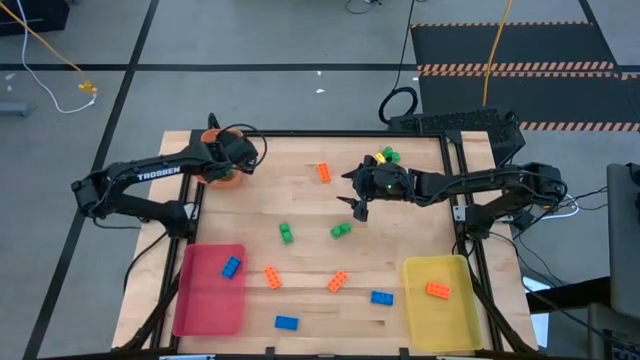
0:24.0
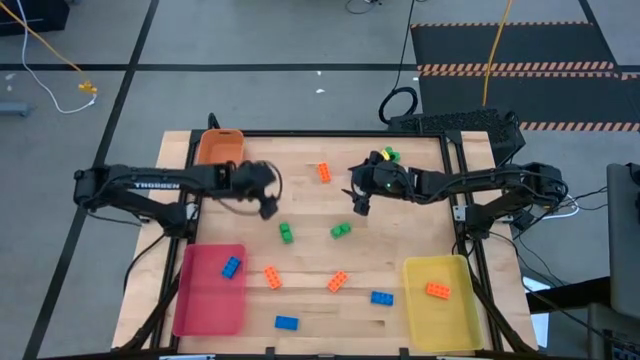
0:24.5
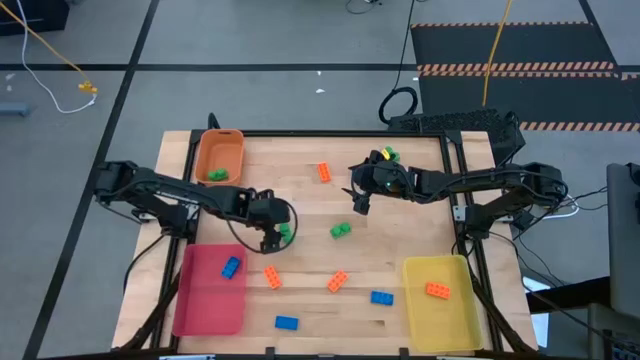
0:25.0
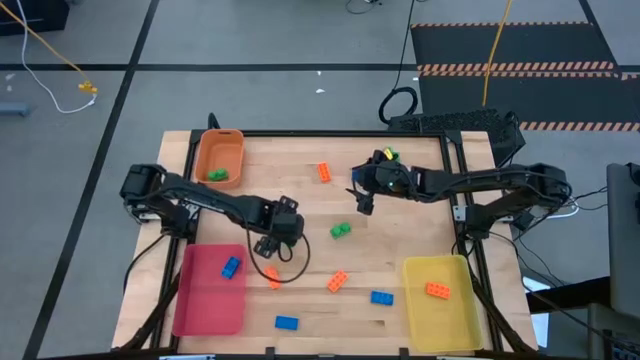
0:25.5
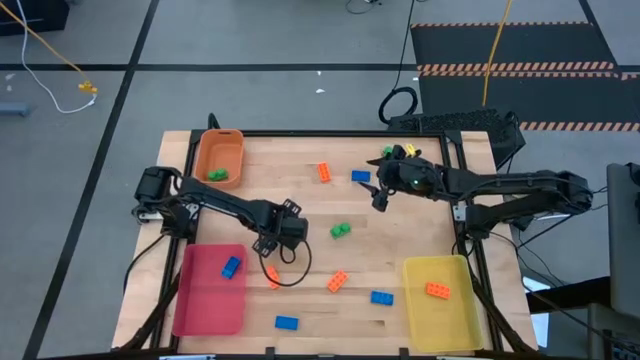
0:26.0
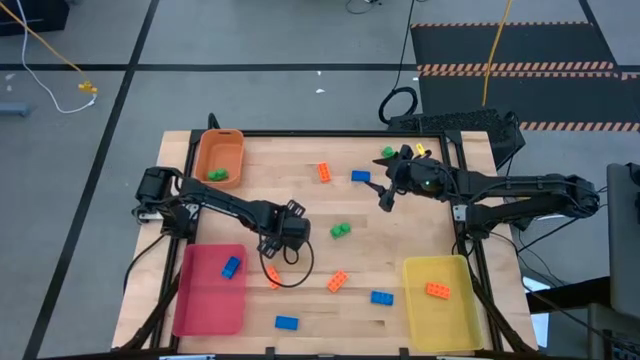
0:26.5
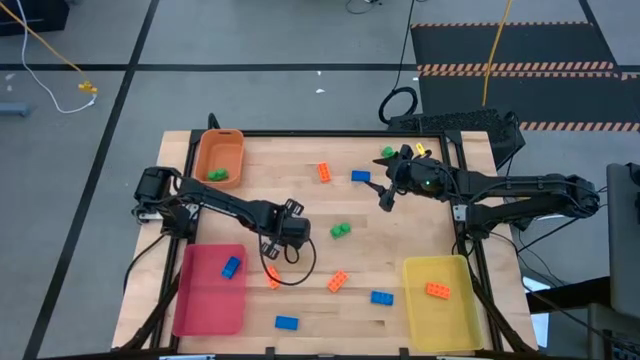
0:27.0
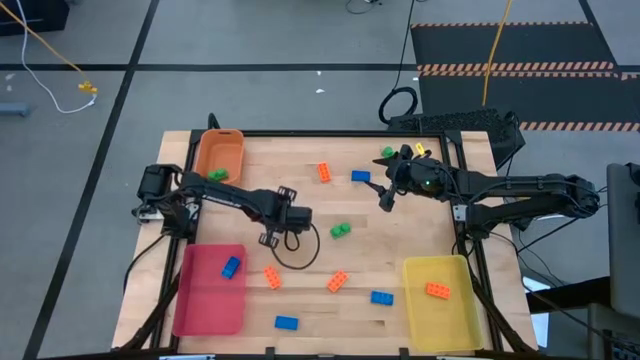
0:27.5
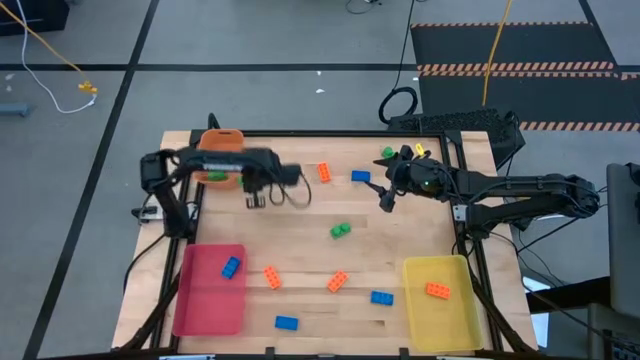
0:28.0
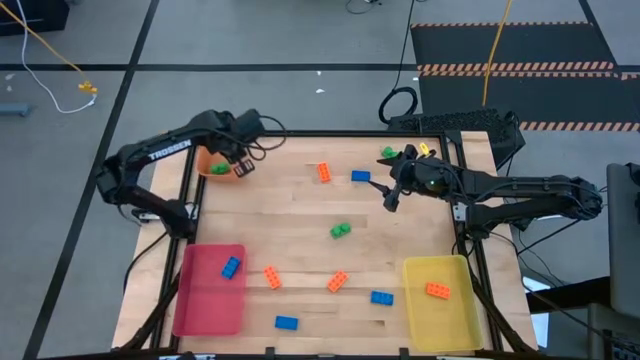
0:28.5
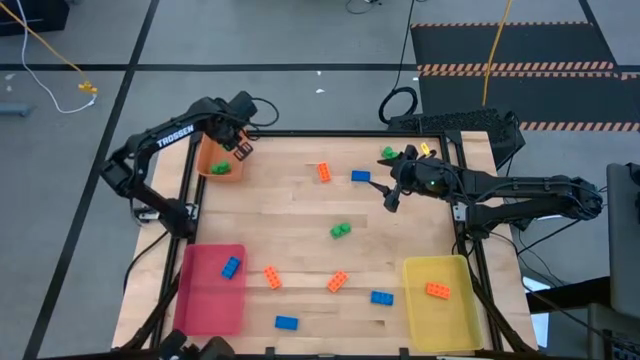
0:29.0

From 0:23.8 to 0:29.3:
Task: Sort & place blocks by color
Put the green game piece into the orange bin

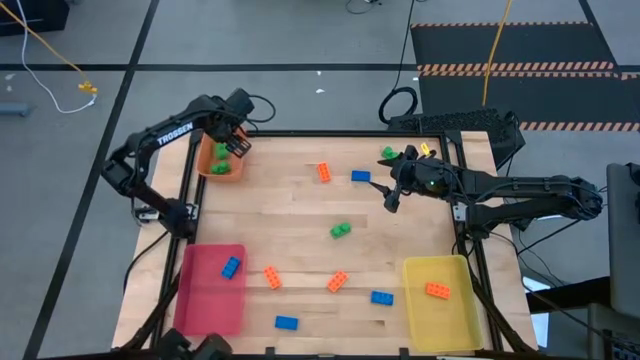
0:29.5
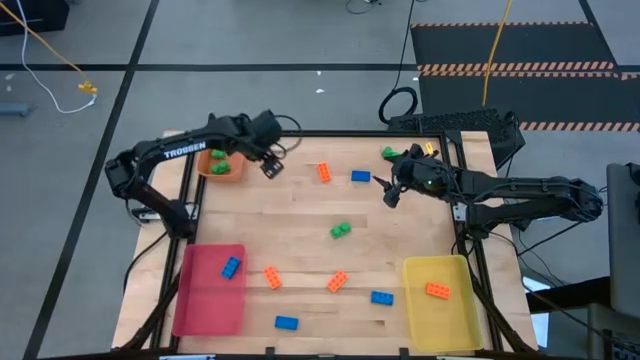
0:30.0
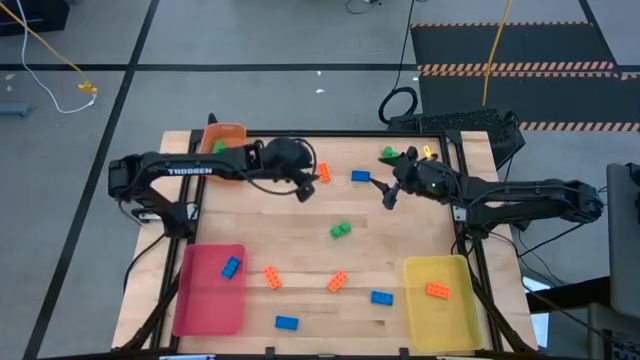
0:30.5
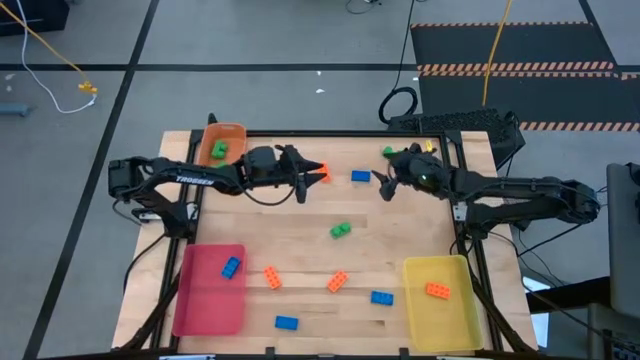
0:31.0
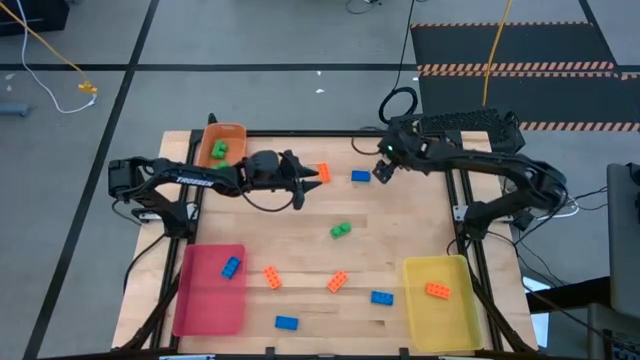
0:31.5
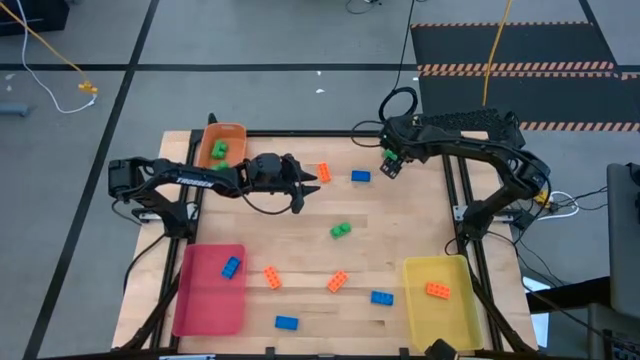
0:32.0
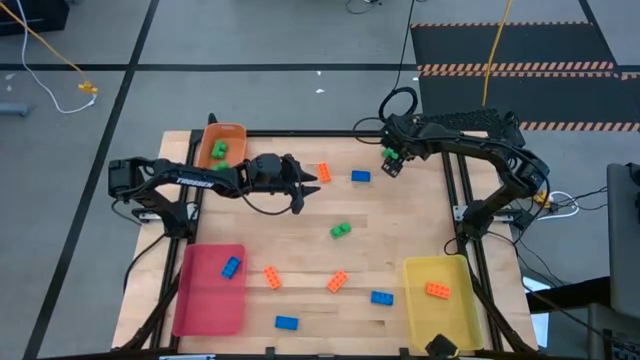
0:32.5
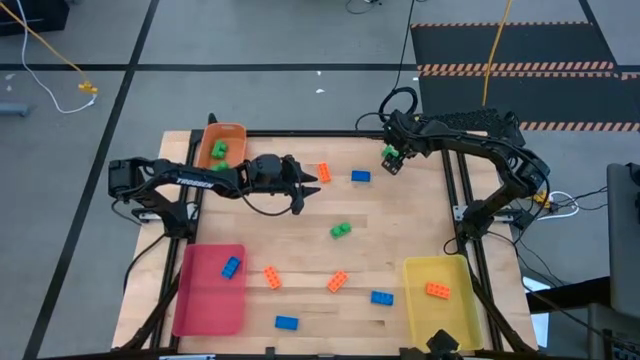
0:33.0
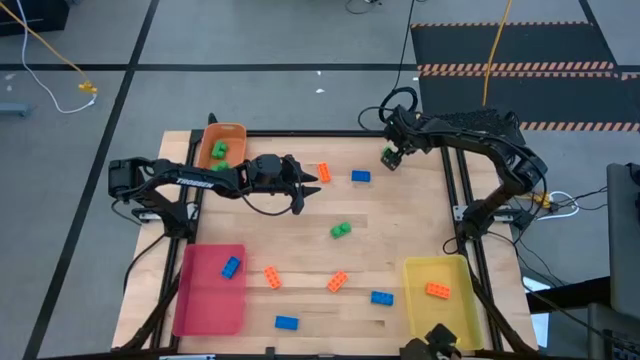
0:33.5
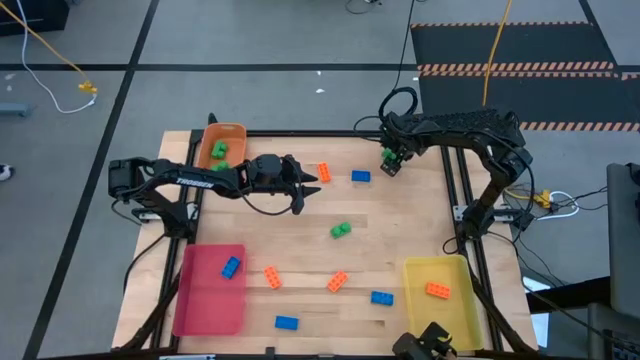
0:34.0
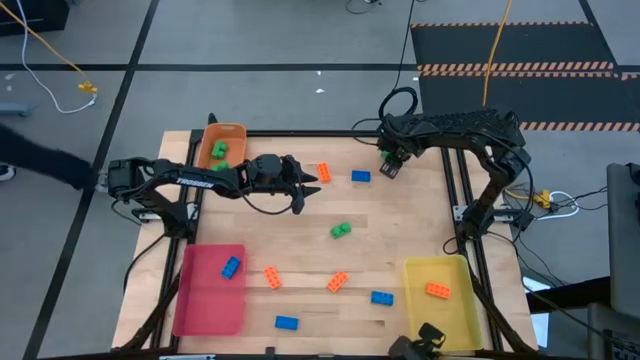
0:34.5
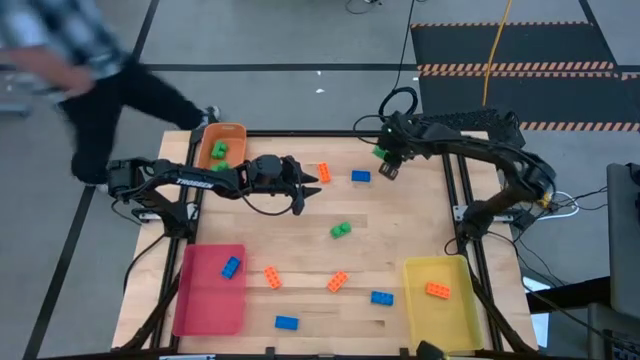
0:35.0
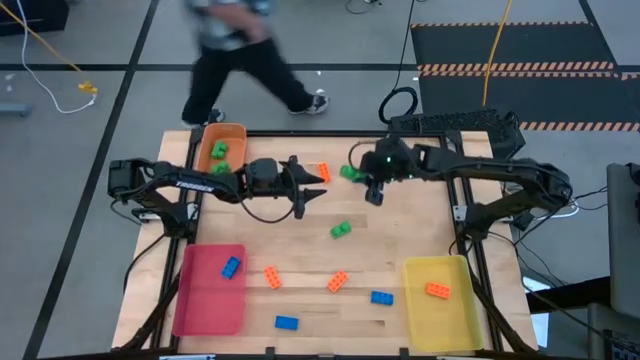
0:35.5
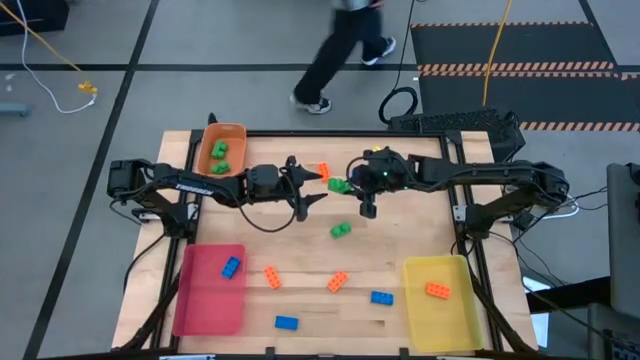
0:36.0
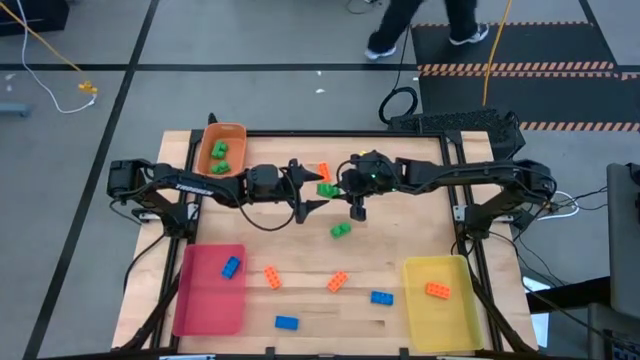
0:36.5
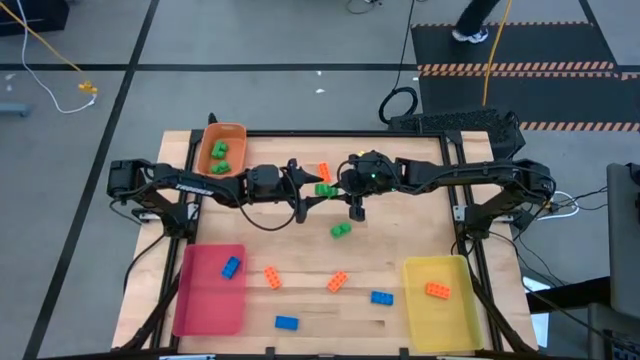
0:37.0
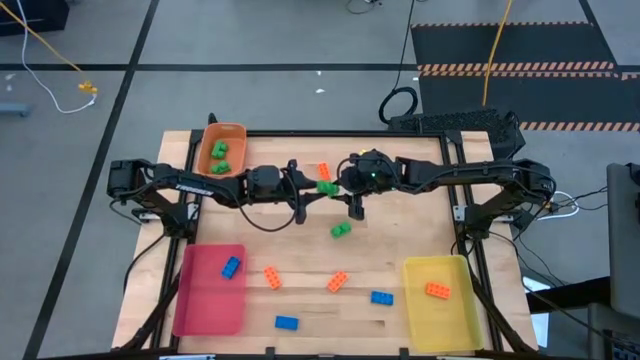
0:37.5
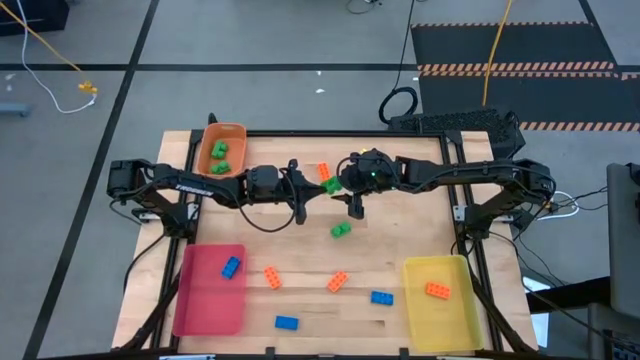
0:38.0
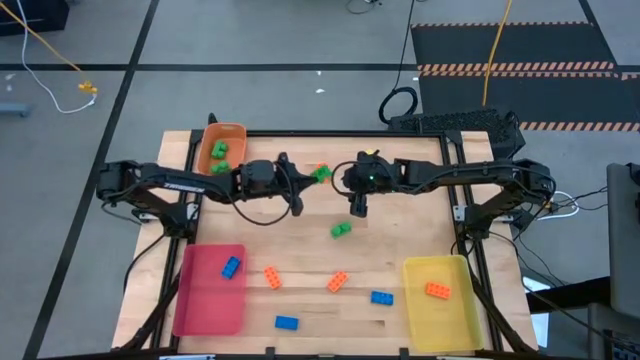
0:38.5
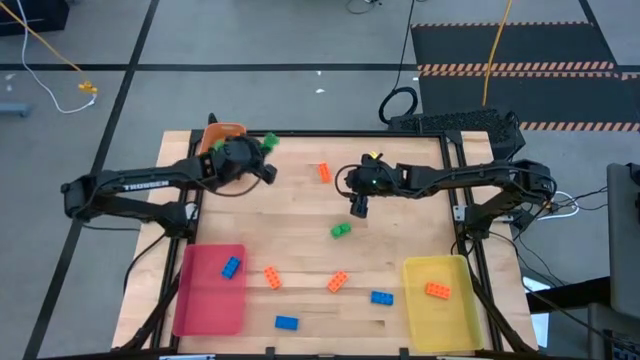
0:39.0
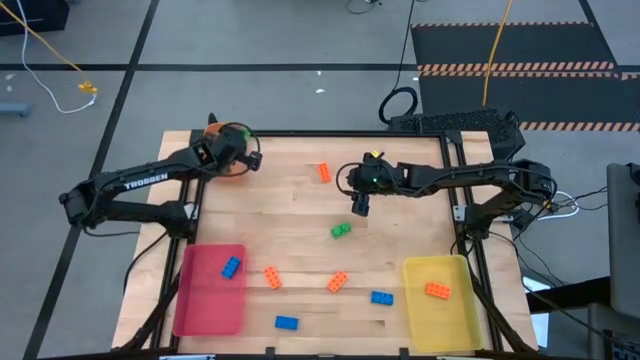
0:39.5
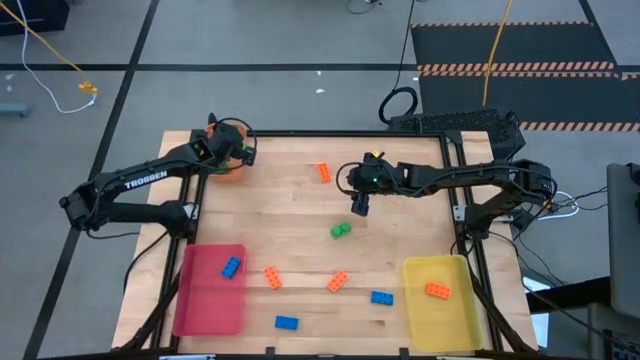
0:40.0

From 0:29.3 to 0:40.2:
Put the game piece into the orange bin

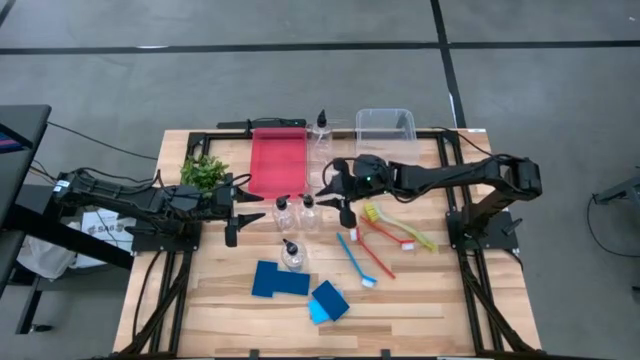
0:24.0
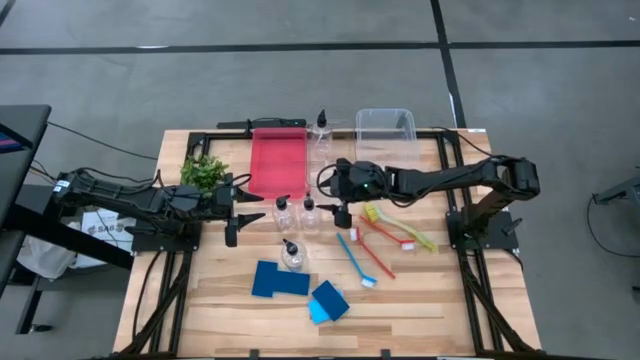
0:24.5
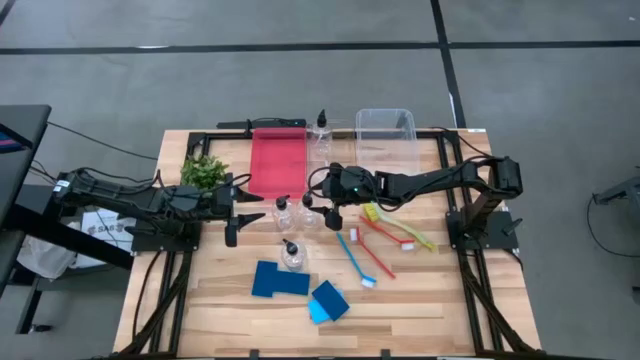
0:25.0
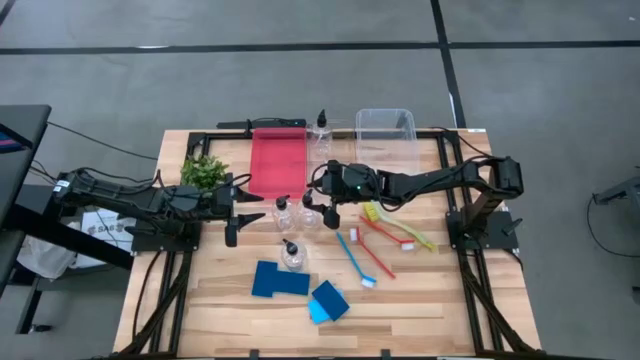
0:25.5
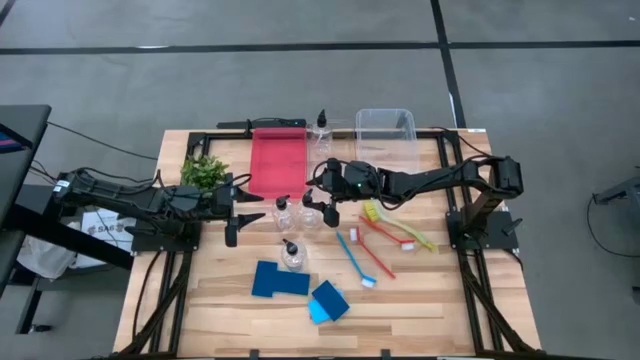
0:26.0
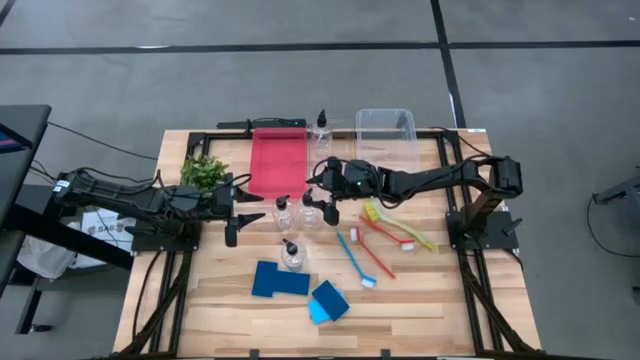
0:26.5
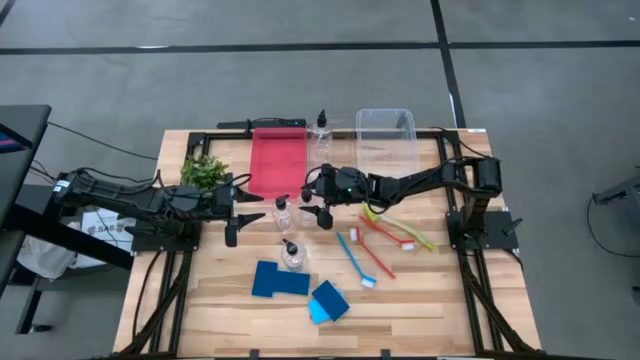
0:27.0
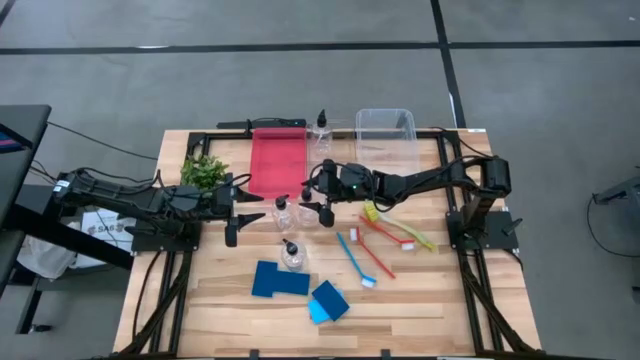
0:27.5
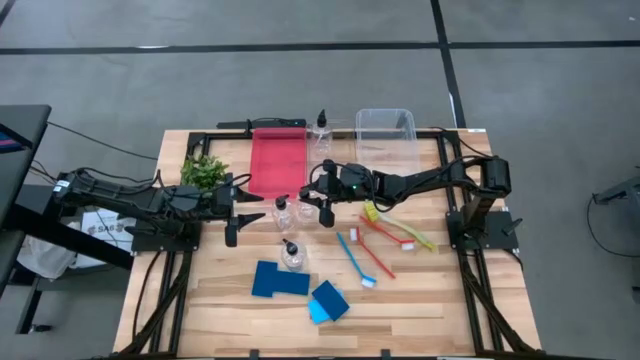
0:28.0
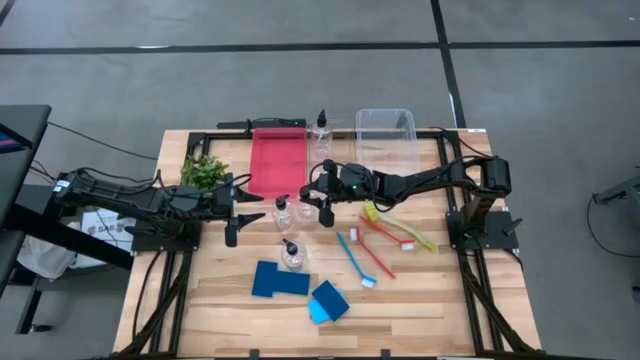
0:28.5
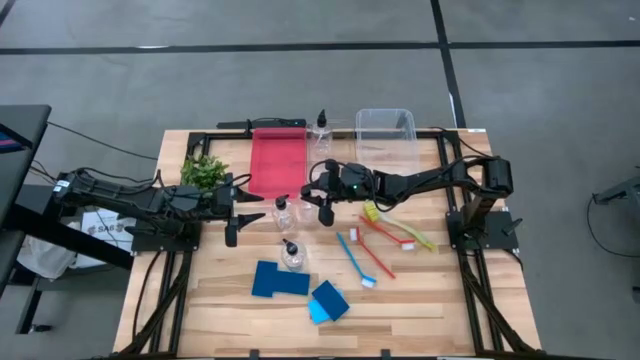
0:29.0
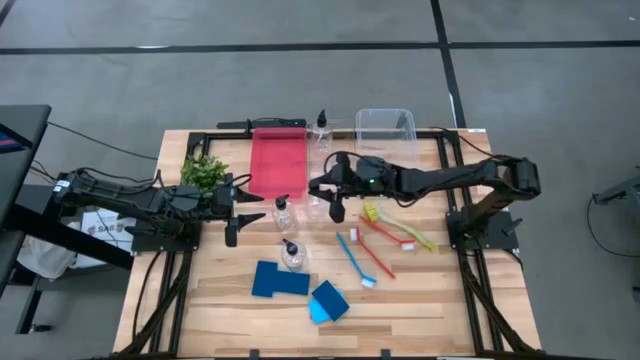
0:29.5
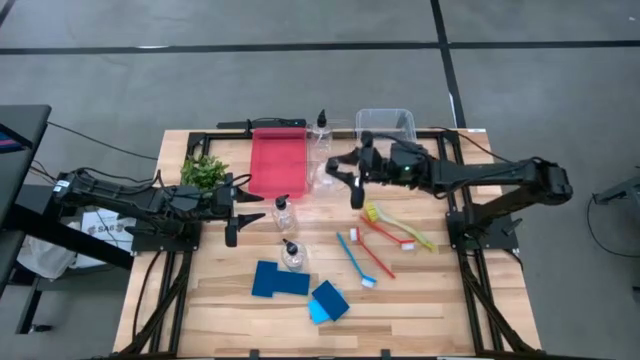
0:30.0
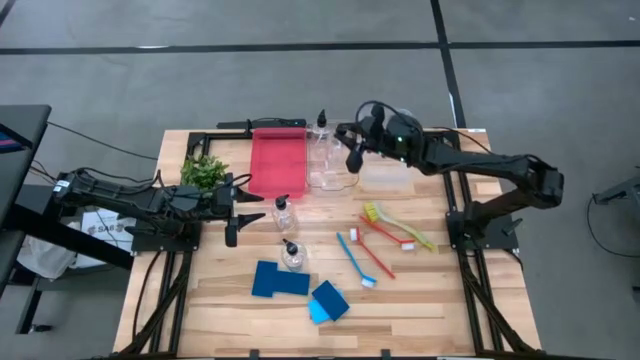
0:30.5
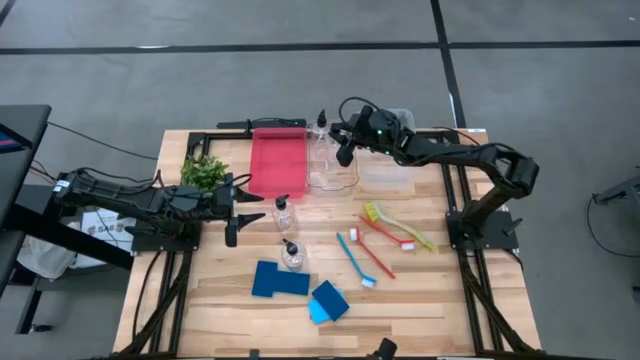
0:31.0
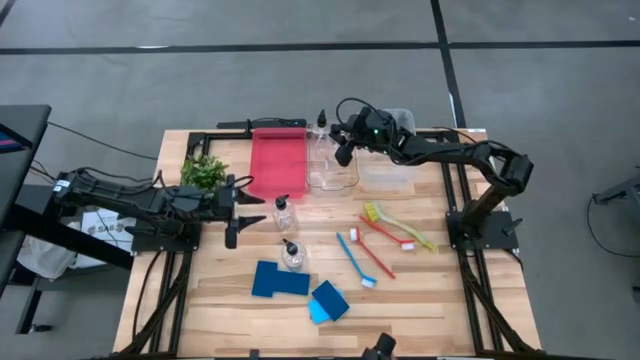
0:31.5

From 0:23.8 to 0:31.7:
Task: Pick & Place Kitchen Sink Supplies
Put the soap dispenser into the left transparent bin
